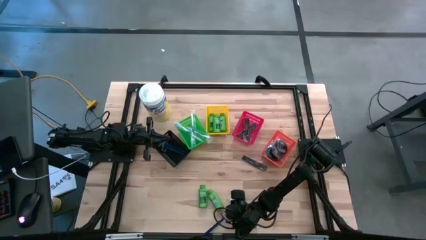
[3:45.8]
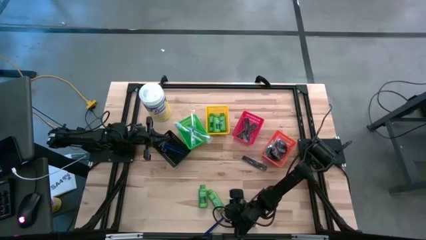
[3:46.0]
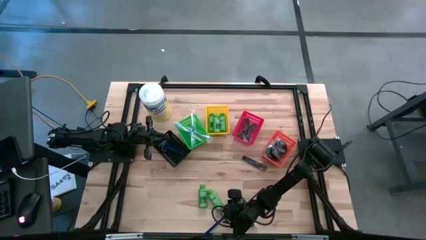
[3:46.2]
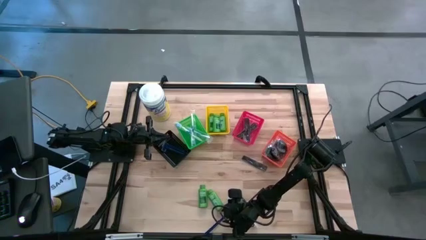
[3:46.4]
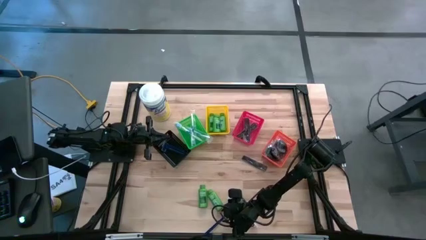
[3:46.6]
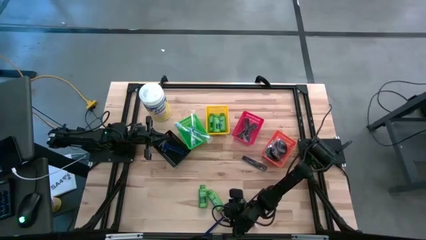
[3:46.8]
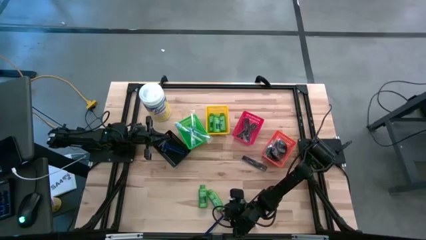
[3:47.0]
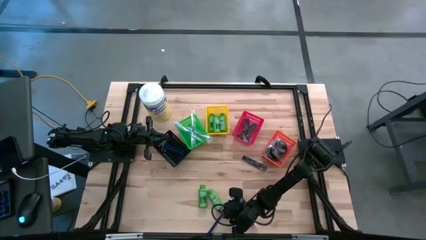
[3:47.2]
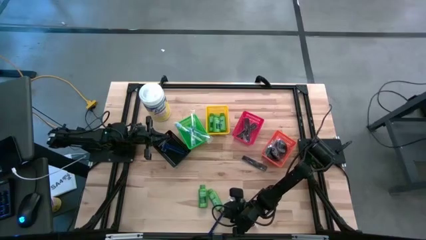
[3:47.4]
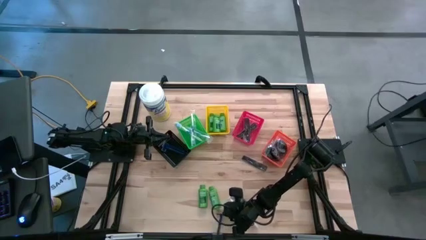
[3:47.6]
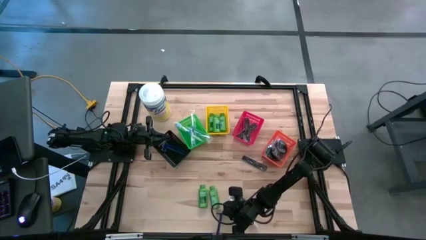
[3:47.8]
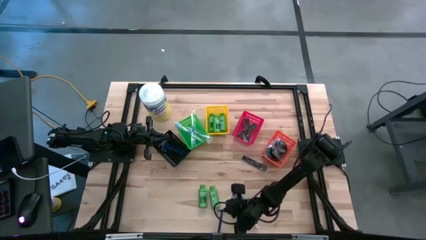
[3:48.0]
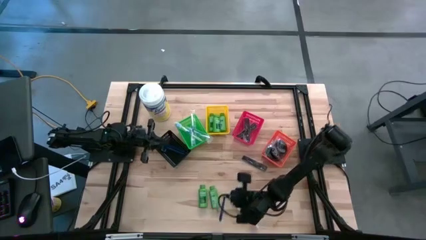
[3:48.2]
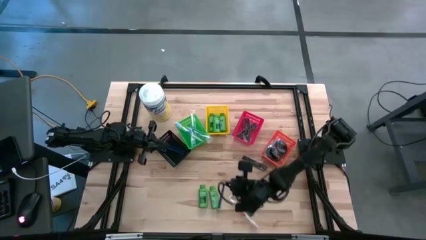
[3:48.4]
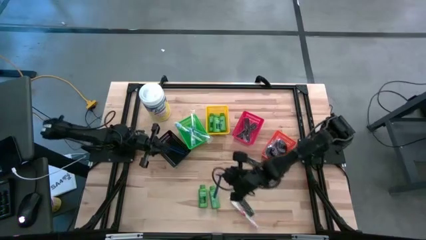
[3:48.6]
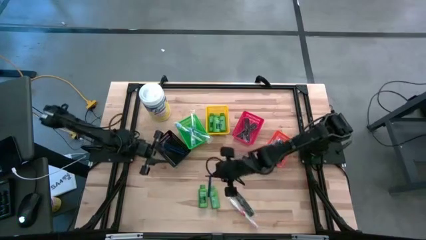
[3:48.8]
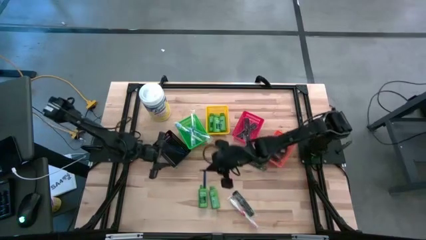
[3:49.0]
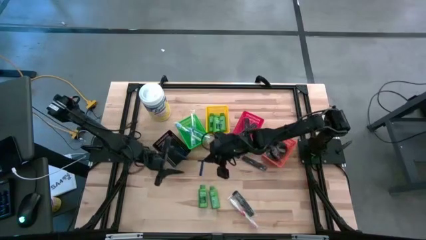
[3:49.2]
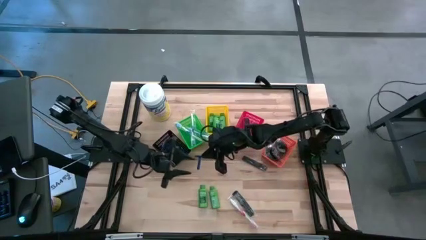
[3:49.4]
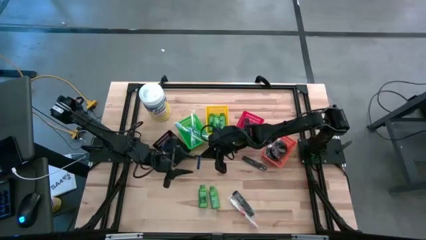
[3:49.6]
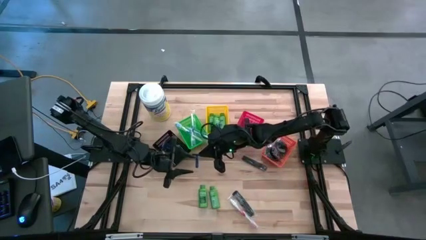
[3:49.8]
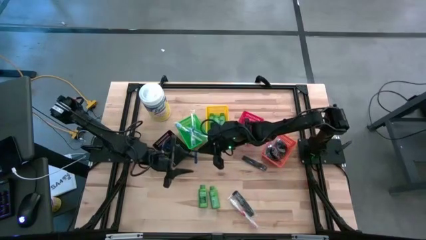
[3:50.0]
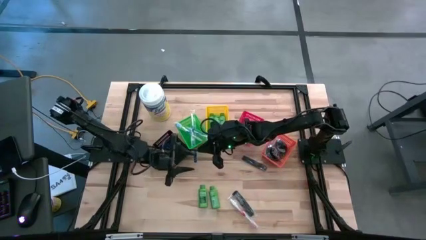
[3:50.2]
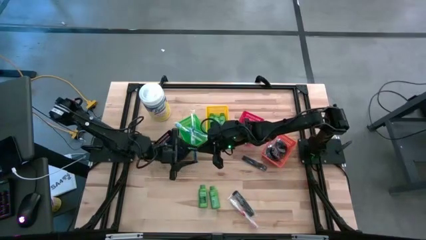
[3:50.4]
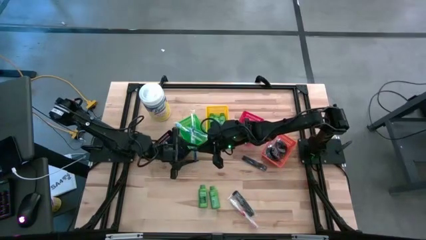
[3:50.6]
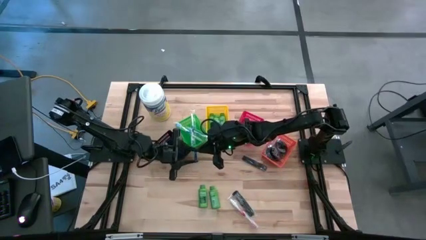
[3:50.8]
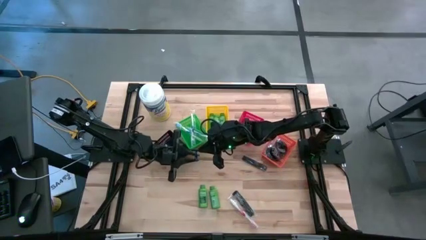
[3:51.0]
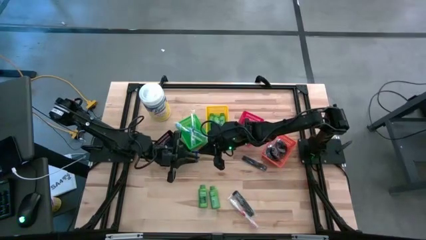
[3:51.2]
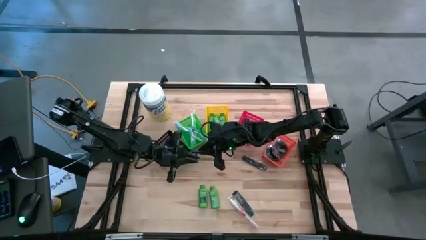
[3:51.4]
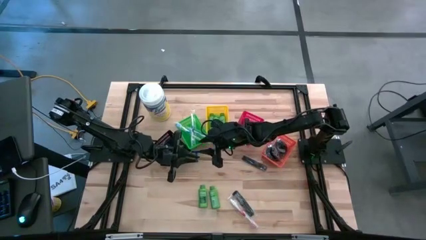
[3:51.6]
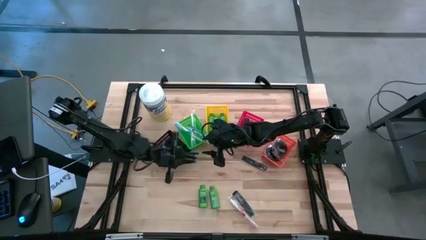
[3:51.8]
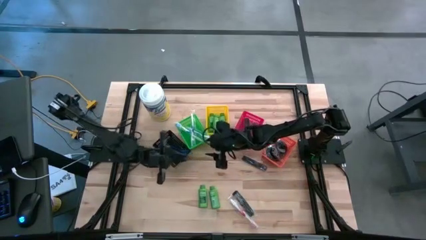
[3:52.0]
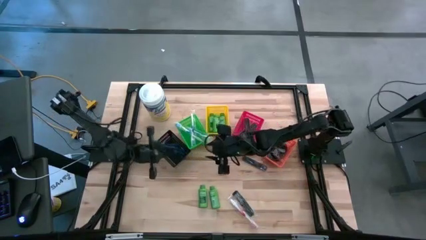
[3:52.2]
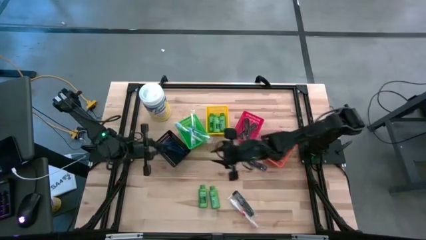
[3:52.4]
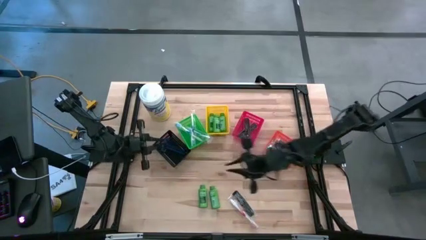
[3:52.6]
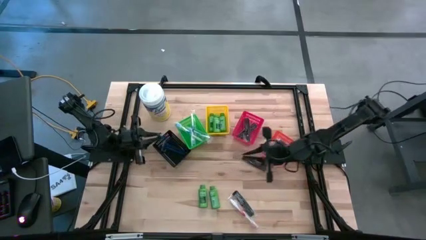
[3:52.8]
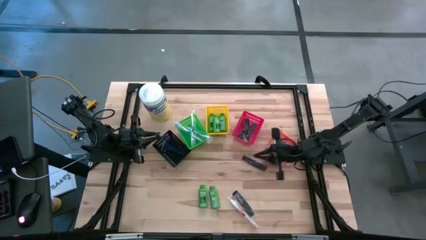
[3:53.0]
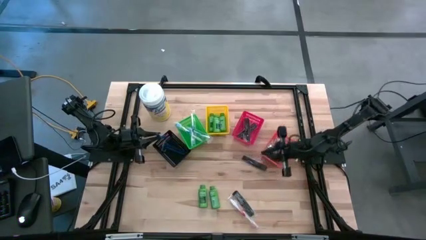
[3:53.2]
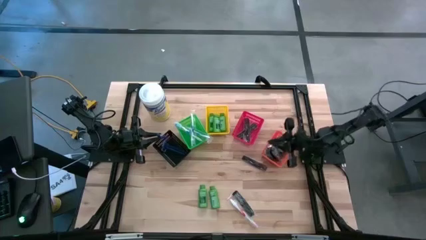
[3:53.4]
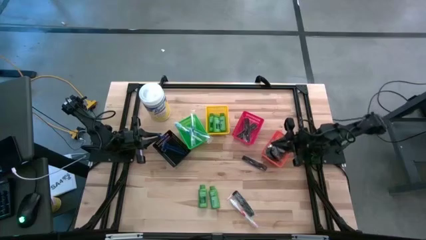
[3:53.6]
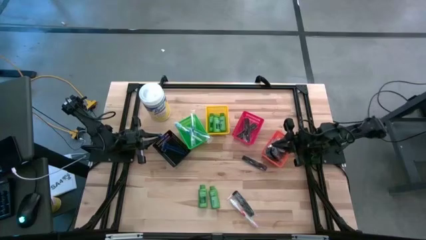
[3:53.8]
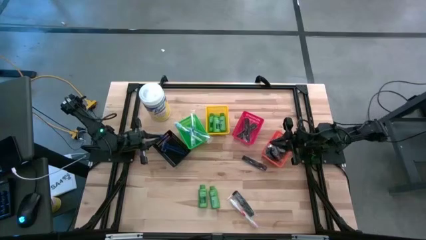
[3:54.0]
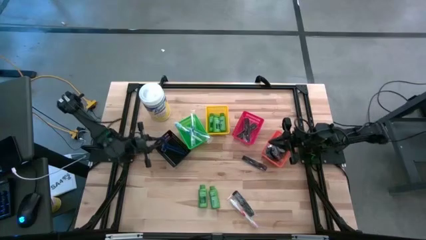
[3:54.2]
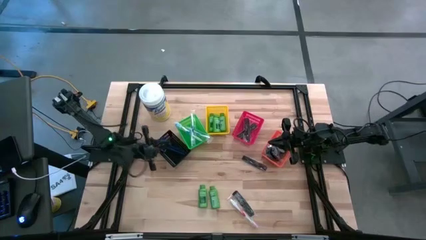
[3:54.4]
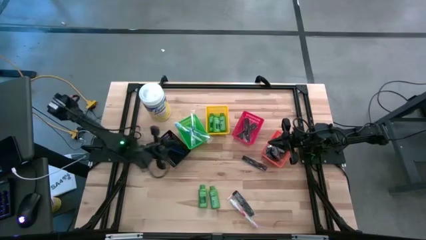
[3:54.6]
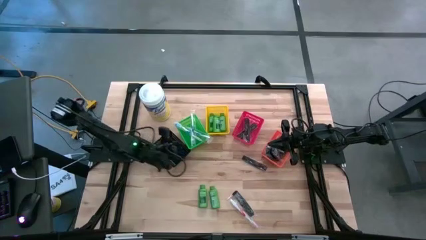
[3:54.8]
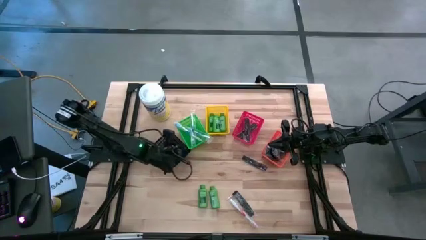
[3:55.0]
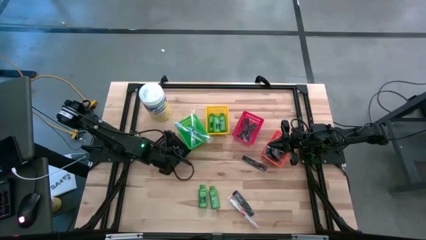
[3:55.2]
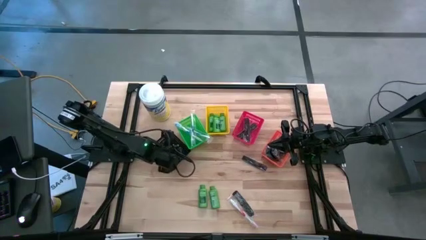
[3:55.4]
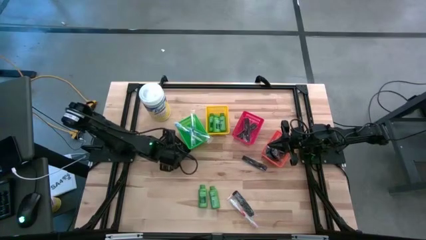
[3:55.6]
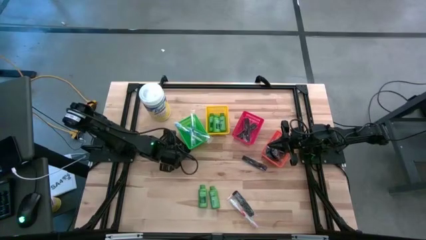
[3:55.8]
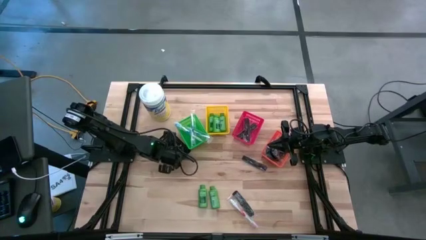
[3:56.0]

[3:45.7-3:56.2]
Task: Pick & Place Travel size toiletries
Put the blue razor into the black bin
